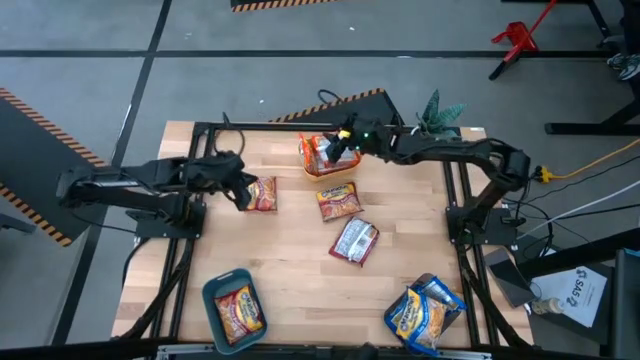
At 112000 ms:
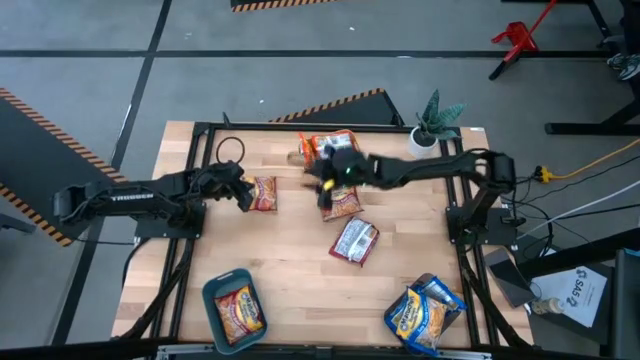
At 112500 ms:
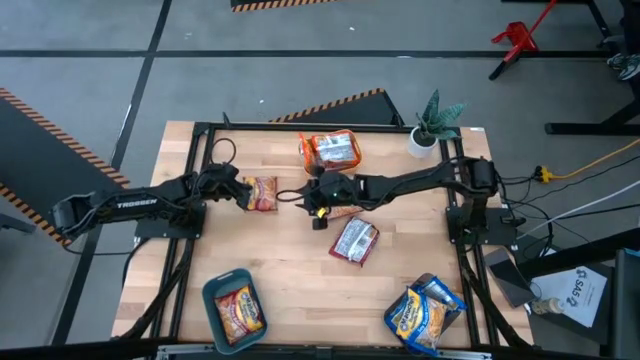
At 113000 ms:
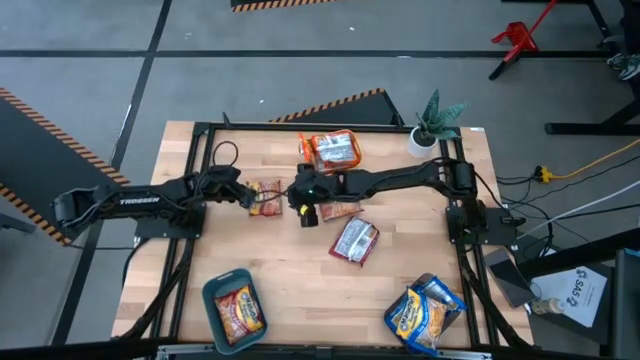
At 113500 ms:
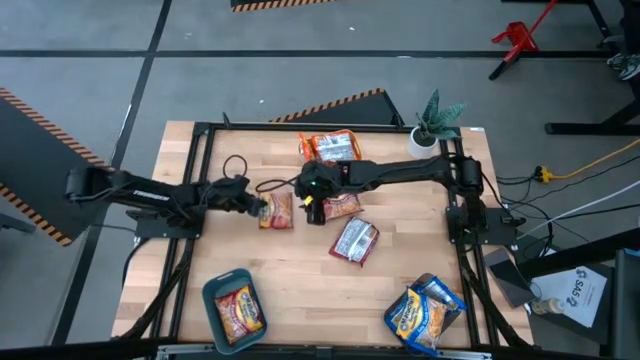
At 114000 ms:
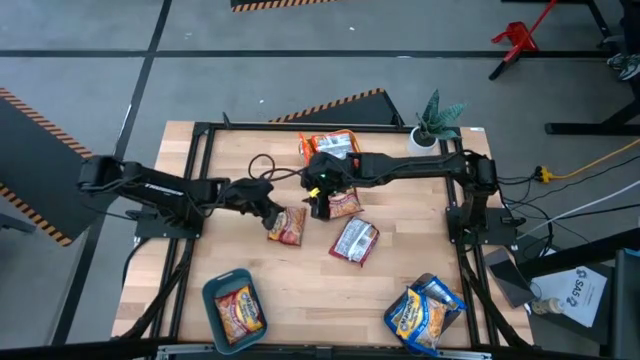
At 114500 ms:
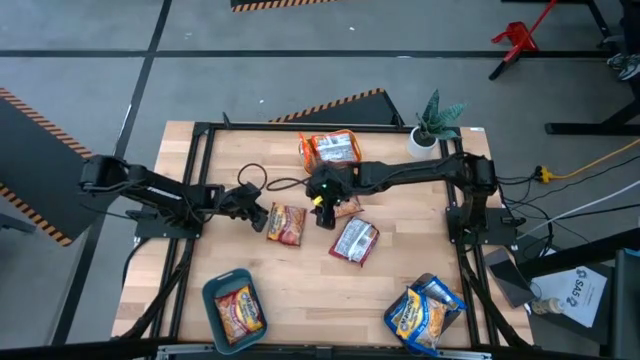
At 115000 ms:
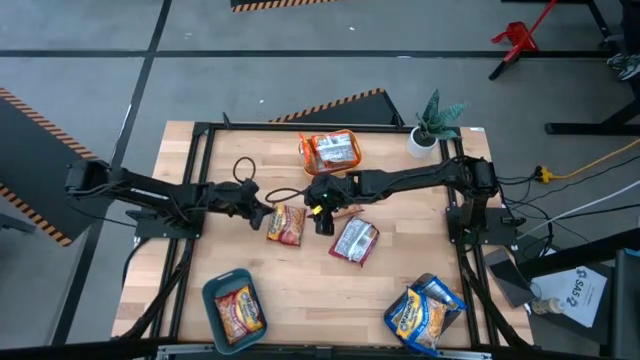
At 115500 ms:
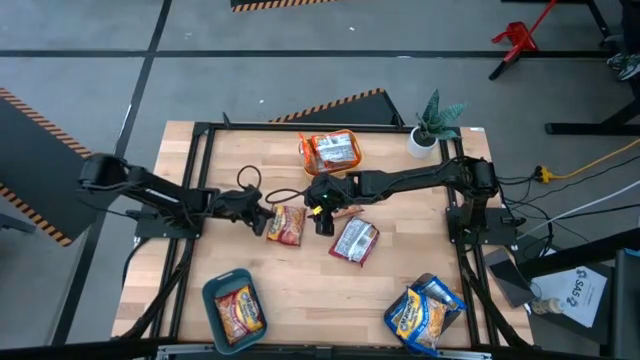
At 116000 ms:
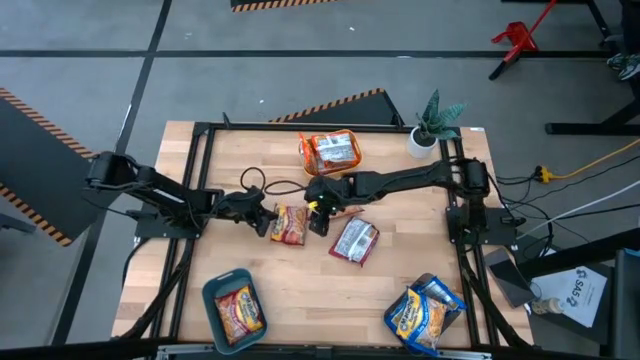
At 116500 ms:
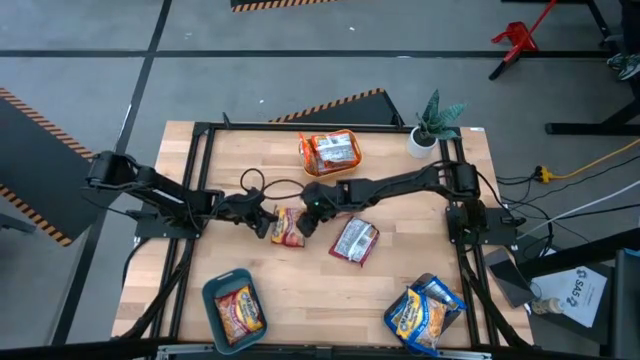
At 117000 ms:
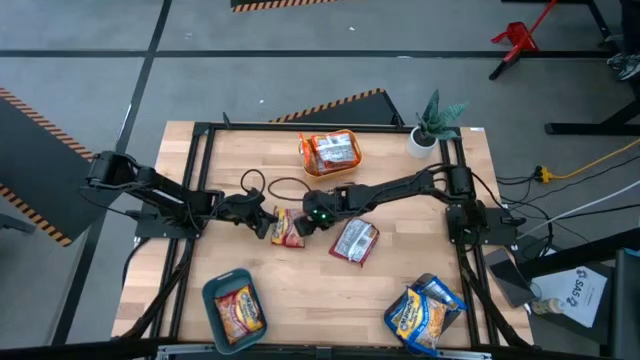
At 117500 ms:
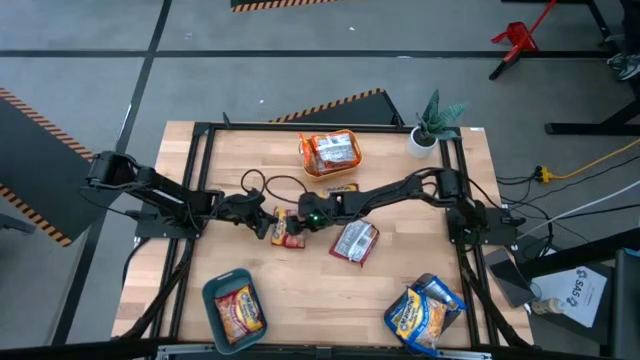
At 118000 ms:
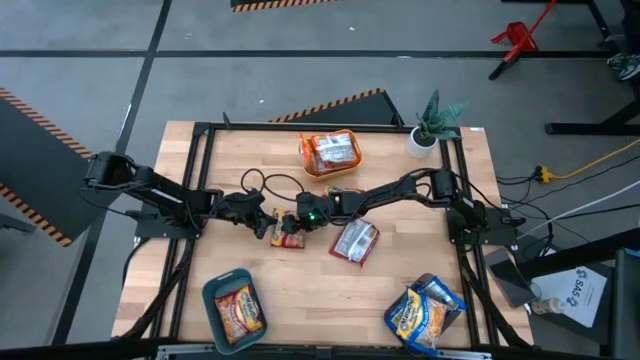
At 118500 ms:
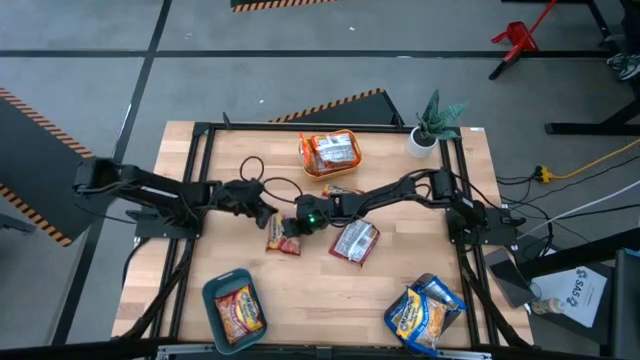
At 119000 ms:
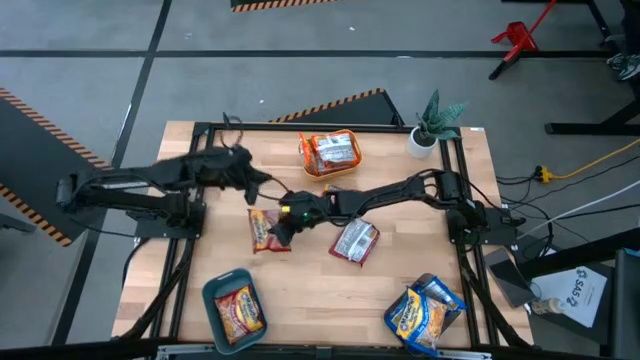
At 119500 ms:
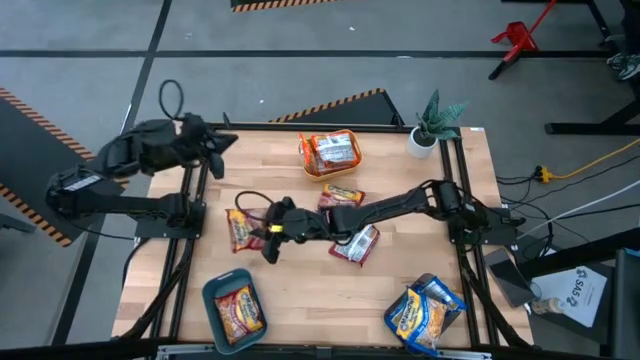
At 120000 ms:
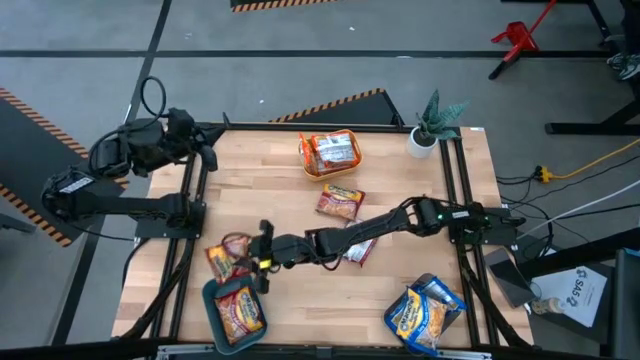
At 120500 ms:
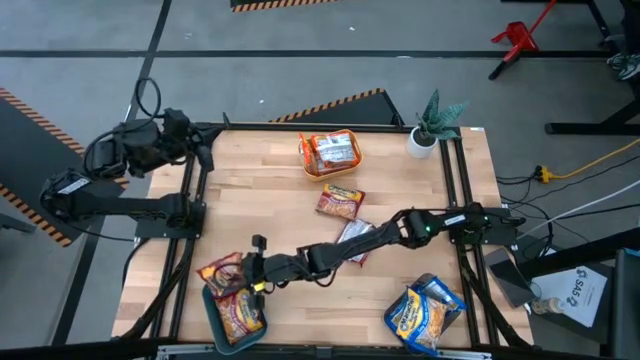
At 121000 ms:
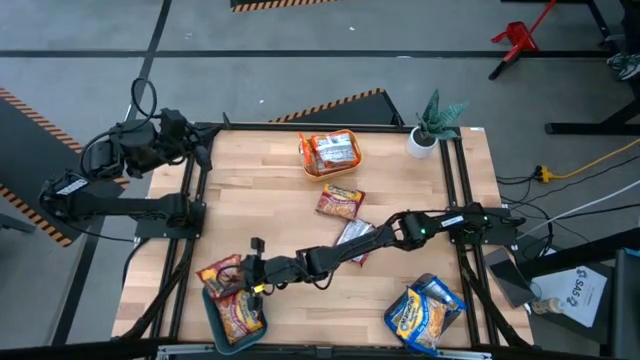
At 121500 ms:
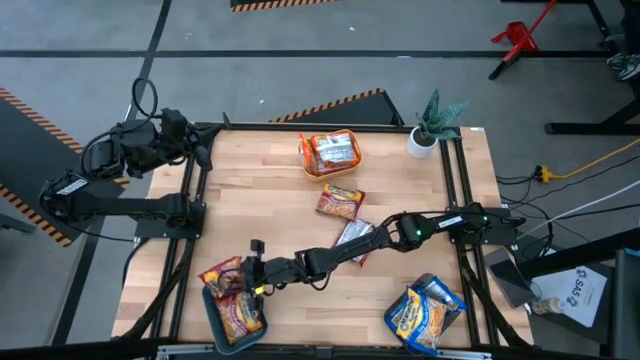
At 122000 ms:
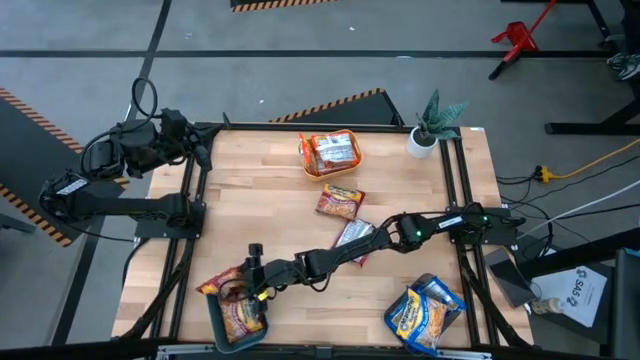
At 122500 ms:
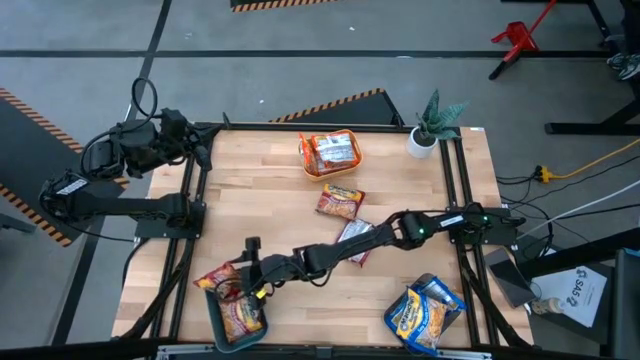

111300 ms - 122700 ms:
Task: Sort Maruchan noodles
Put the red noodle pack into the blue bin

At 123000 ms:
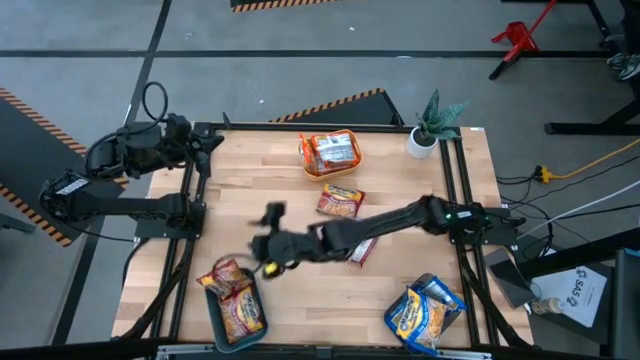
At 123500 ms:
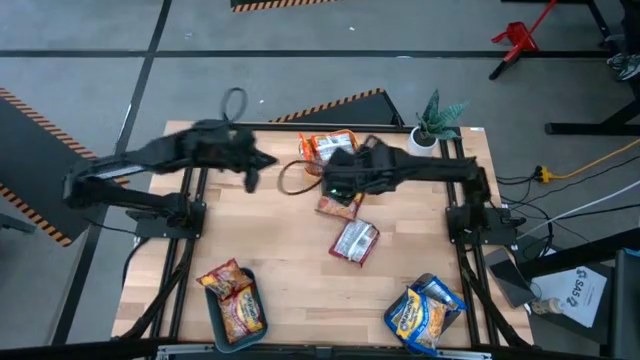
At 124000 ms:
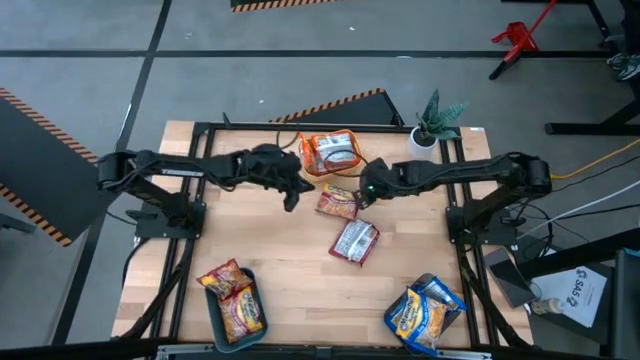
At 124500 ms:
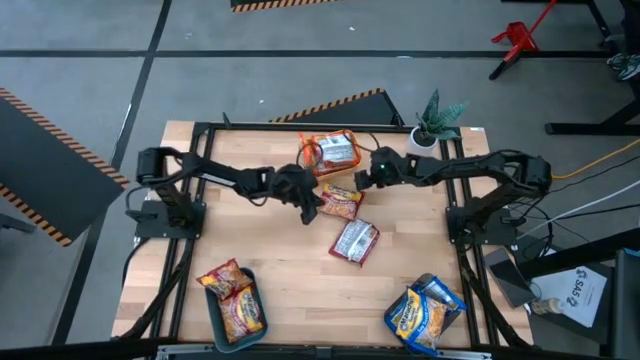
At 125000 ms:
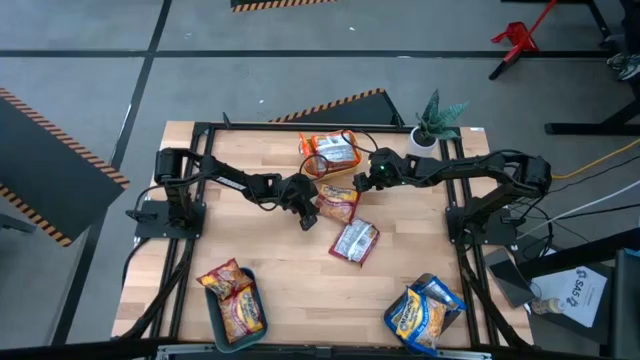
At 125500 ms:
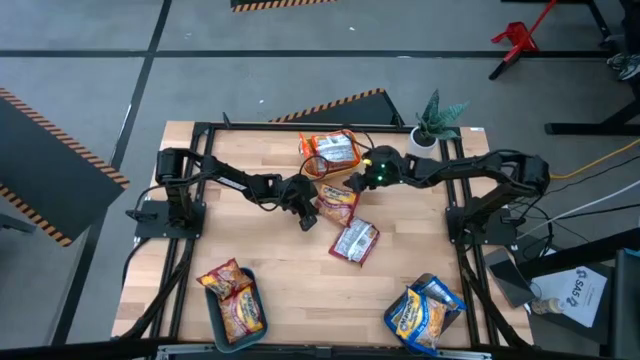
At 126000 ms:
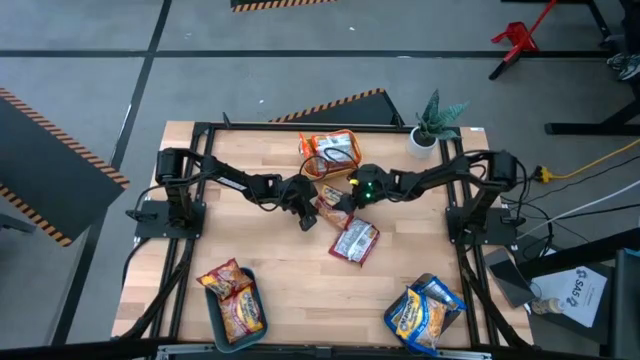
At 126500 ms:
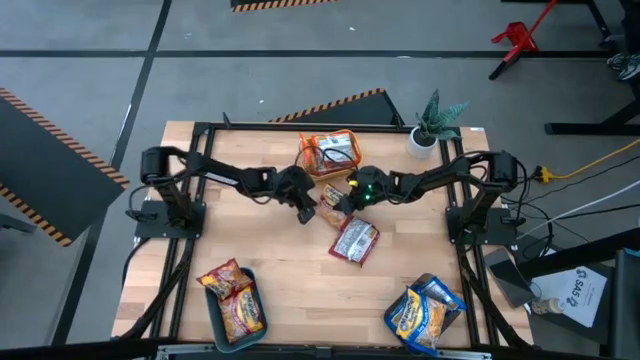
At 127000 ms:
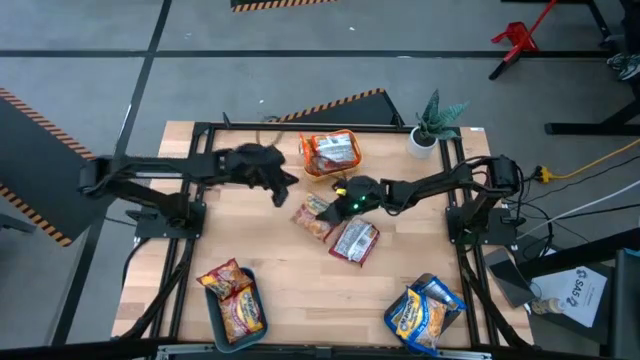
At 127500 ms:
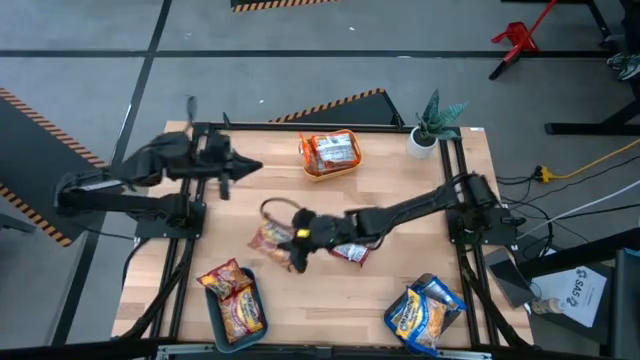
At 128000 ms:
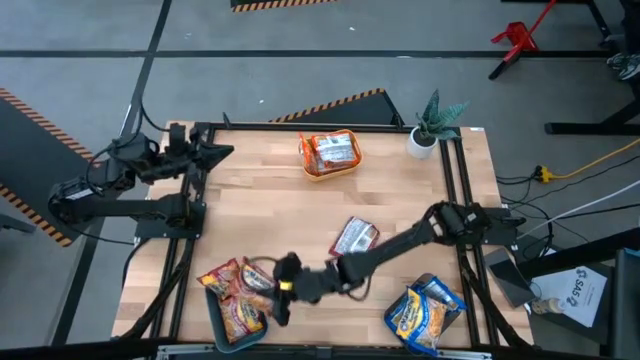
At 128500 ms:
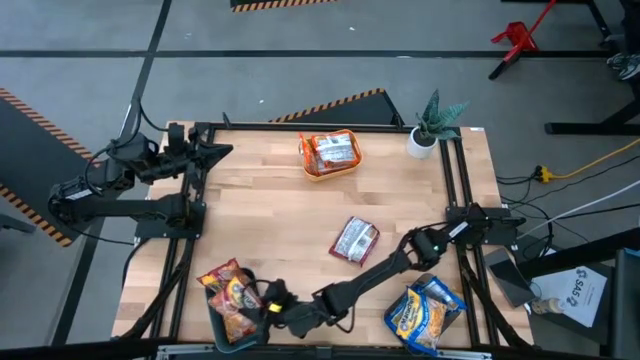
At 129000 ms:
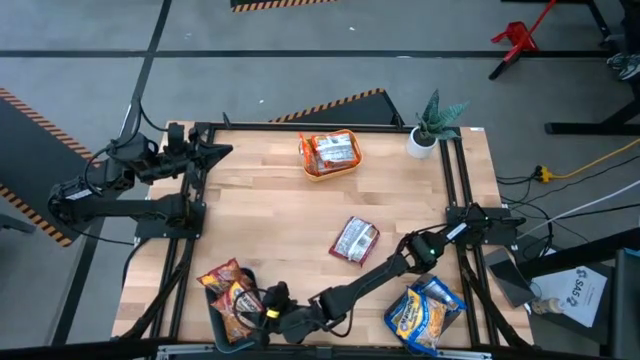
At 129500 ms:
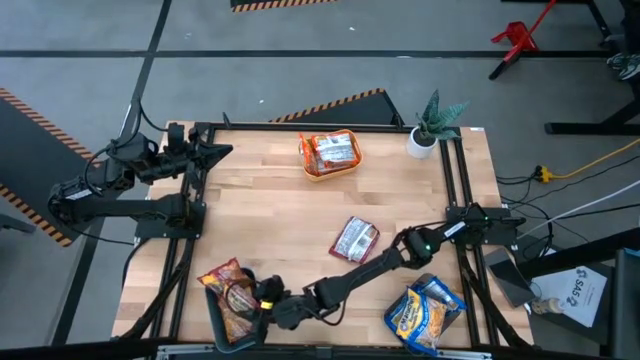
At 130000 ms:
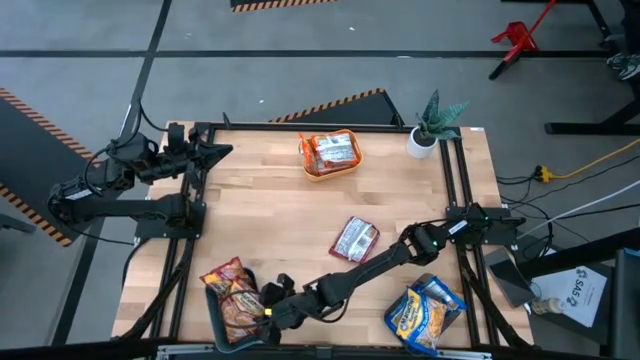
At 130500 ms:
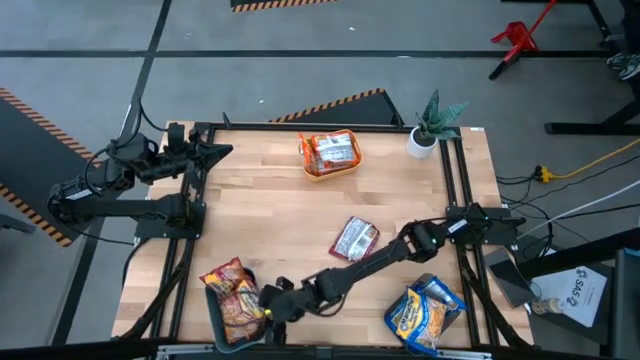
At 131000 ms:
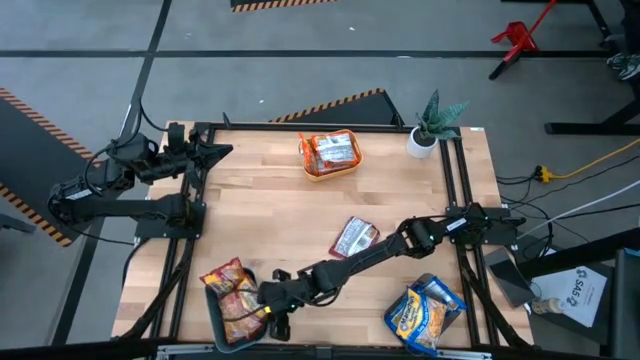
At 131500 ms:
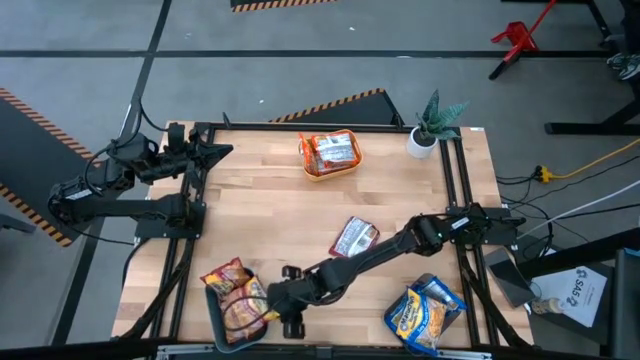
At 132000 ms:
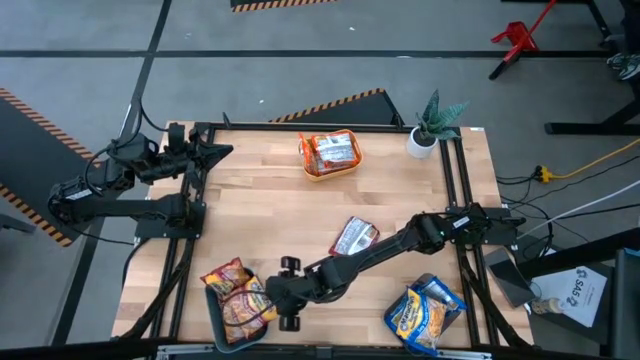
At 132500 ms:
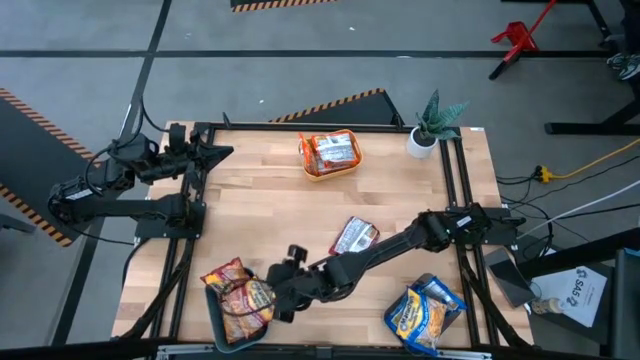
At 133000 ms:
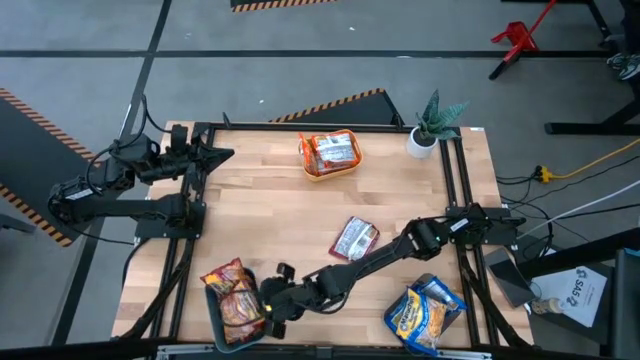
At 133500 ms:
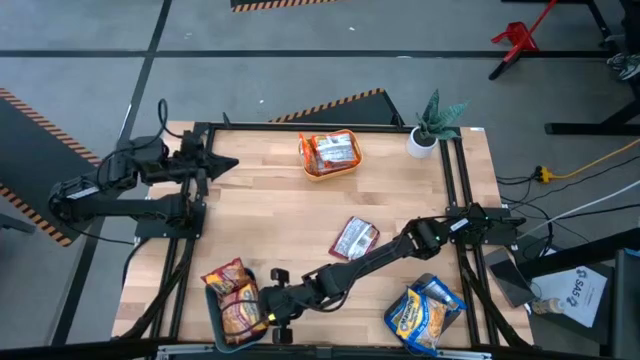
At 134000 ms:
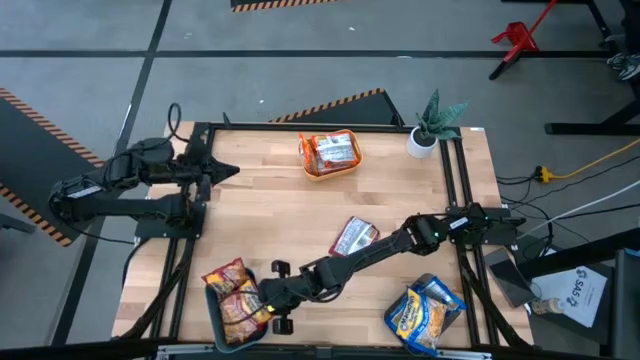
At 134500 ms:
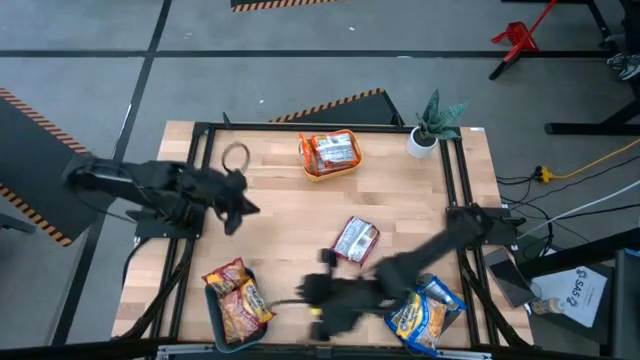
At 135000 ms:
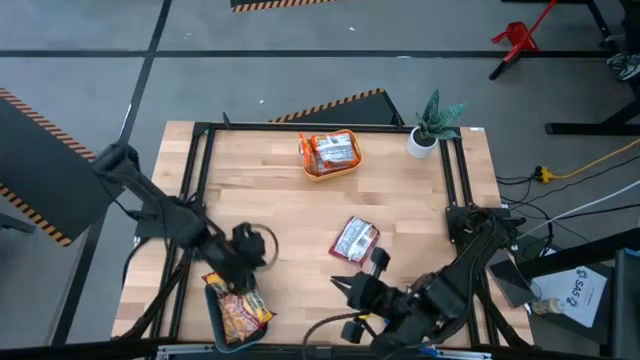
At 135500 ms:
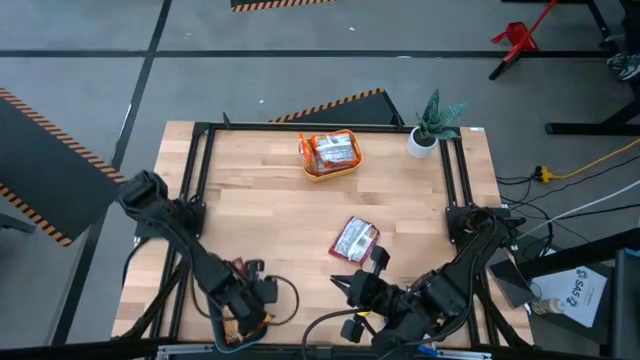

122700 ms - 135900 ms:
Put the red noodle pack into the blue bin
